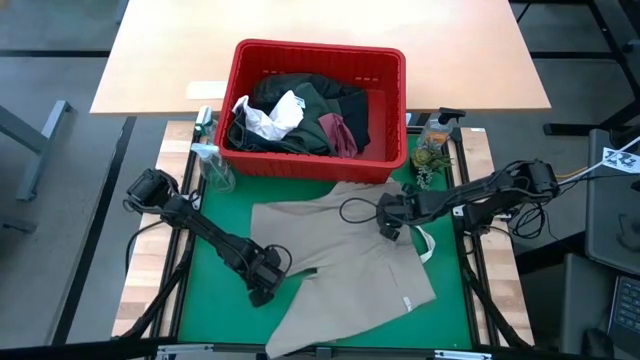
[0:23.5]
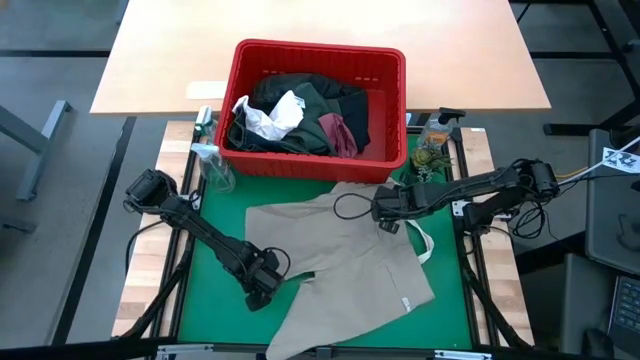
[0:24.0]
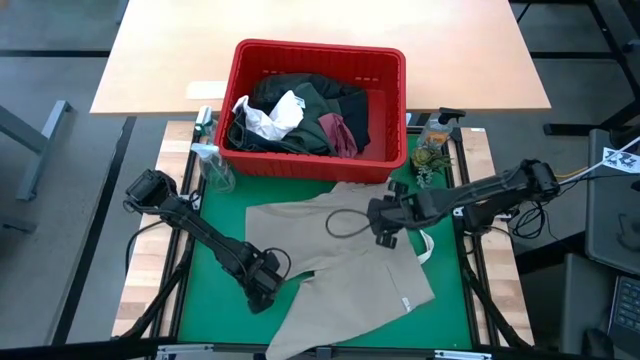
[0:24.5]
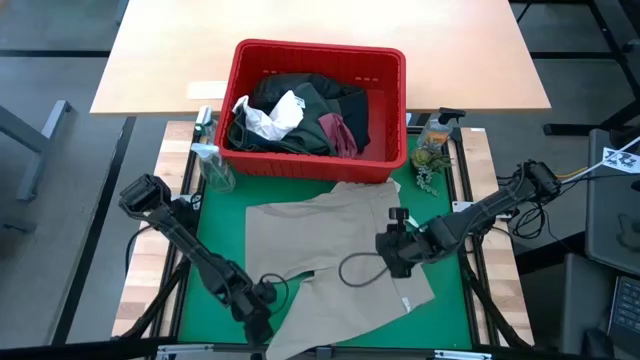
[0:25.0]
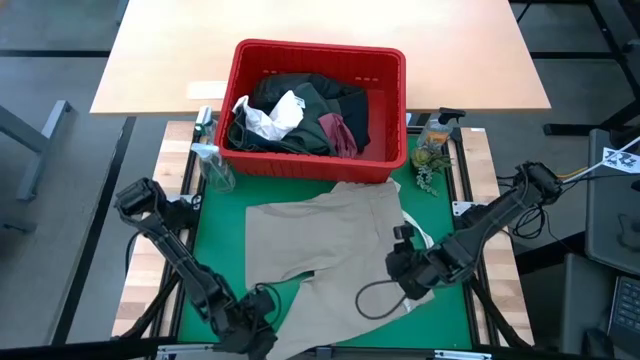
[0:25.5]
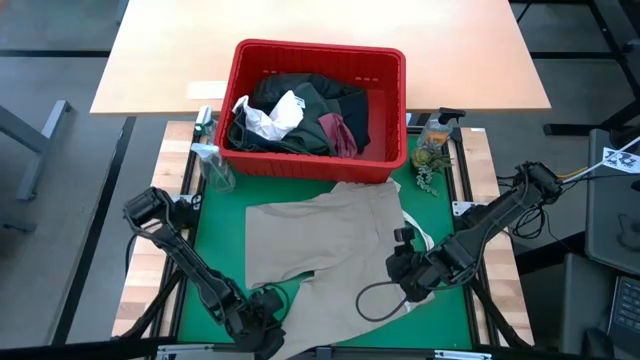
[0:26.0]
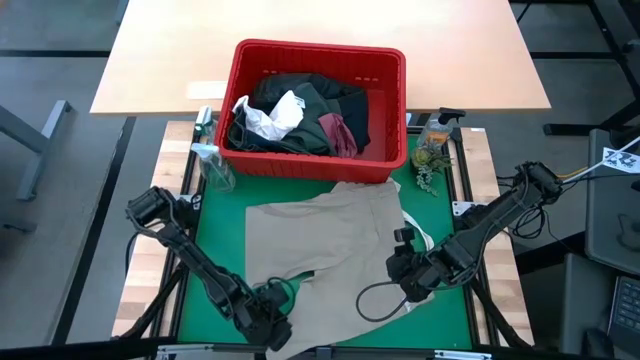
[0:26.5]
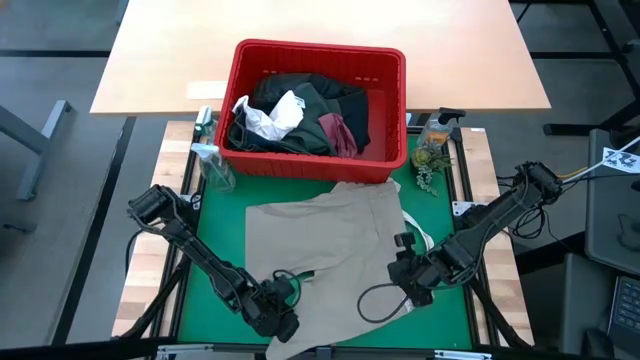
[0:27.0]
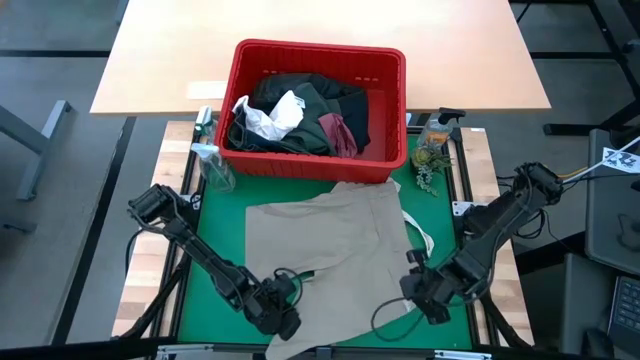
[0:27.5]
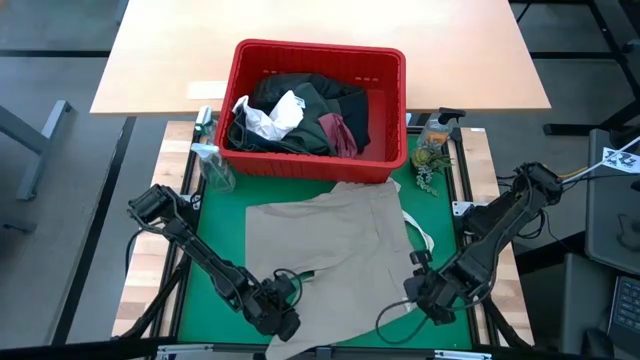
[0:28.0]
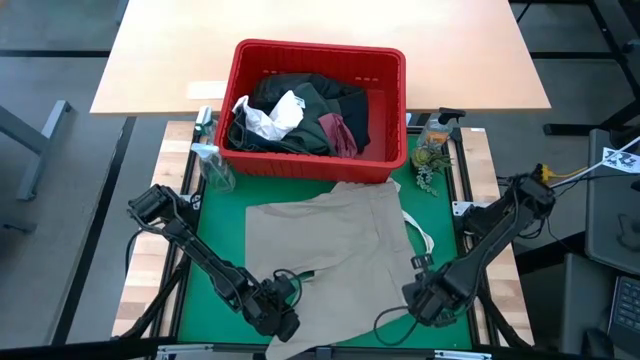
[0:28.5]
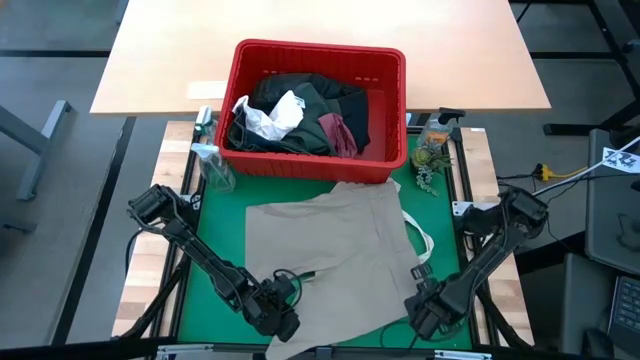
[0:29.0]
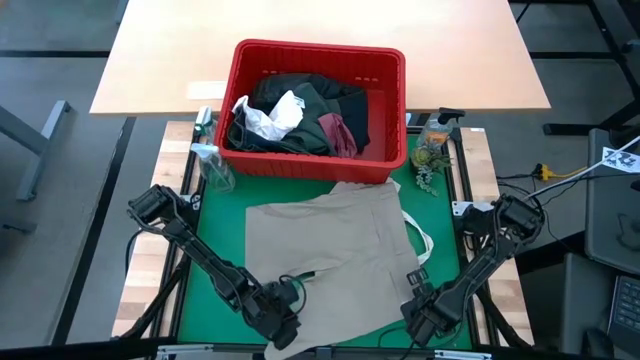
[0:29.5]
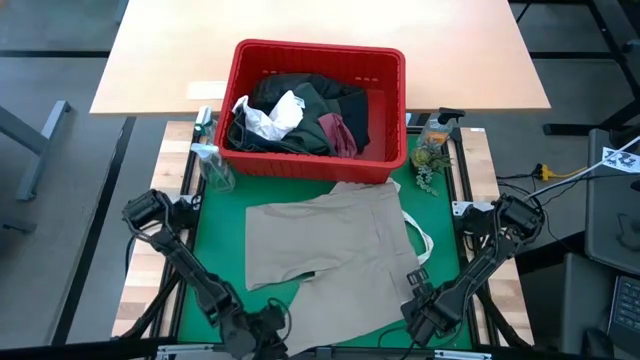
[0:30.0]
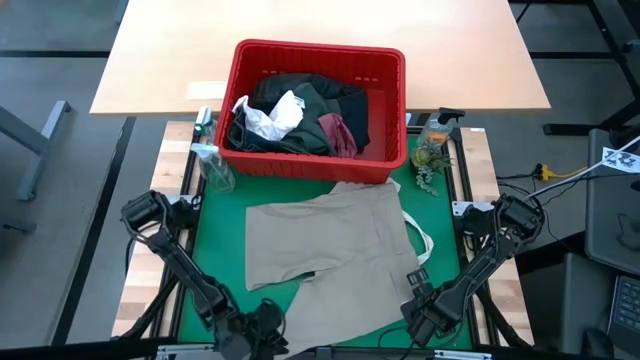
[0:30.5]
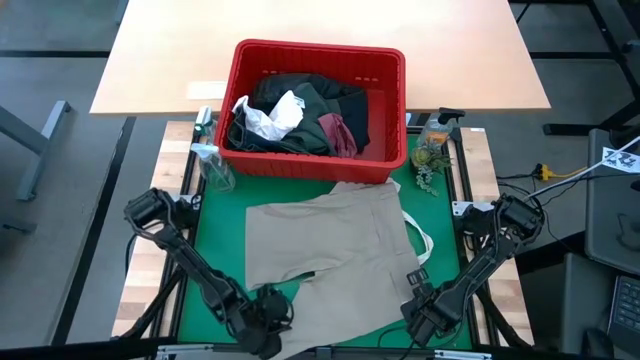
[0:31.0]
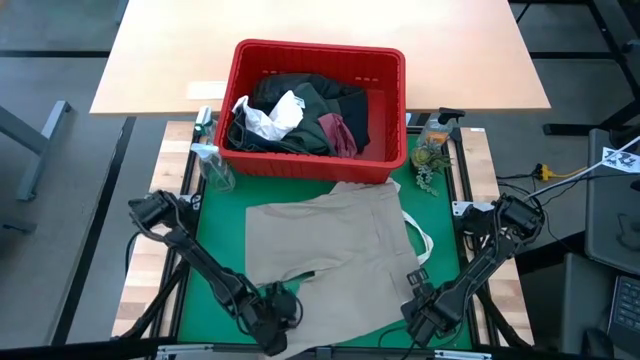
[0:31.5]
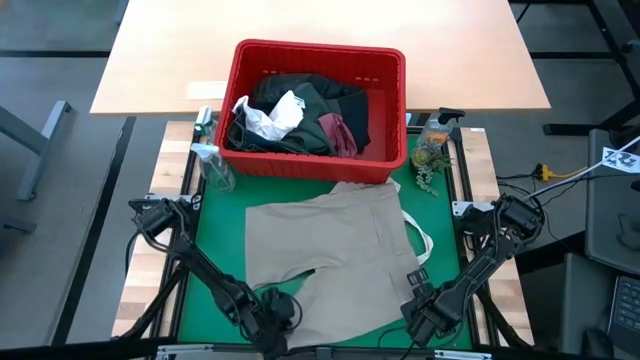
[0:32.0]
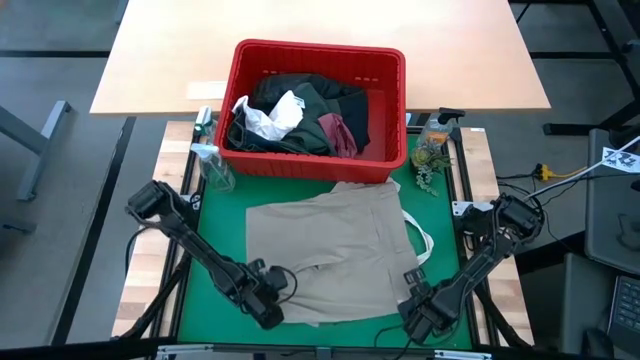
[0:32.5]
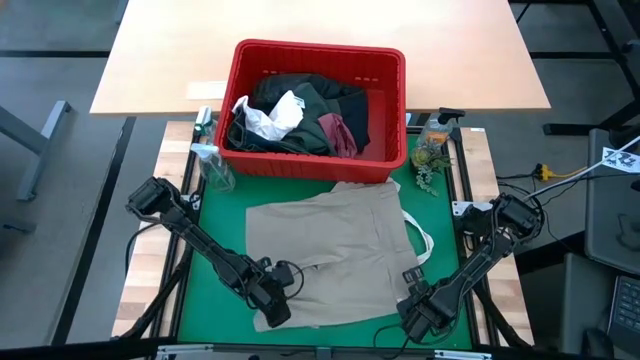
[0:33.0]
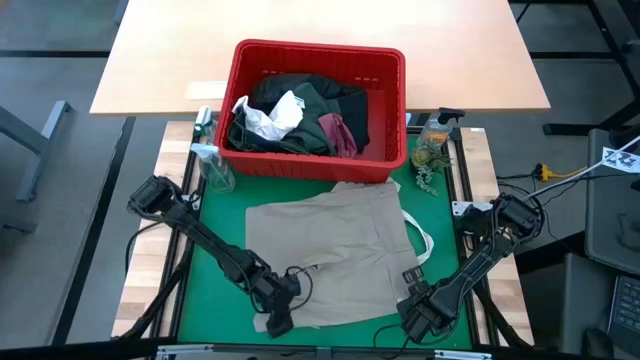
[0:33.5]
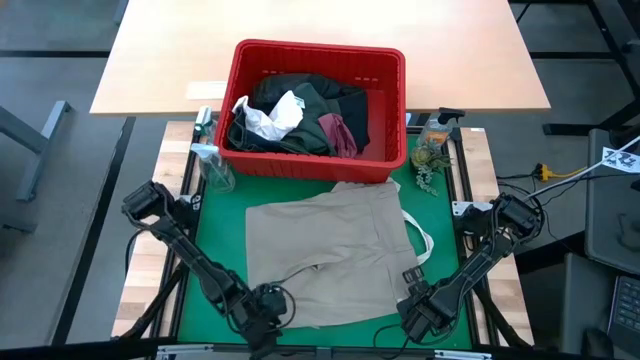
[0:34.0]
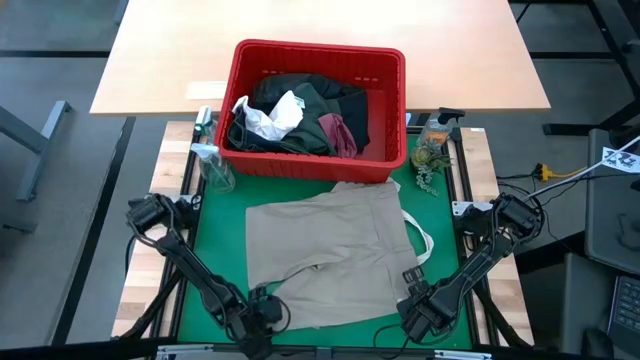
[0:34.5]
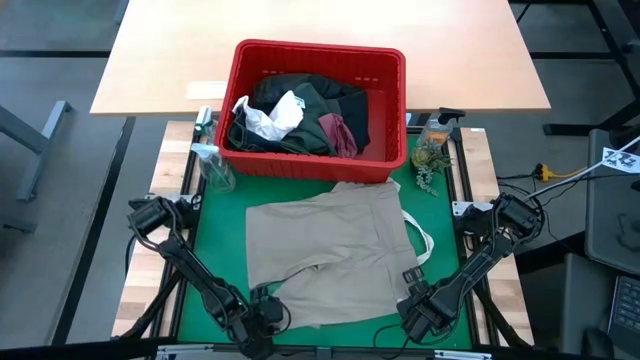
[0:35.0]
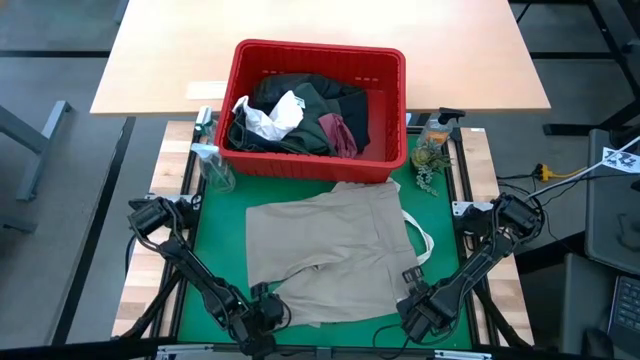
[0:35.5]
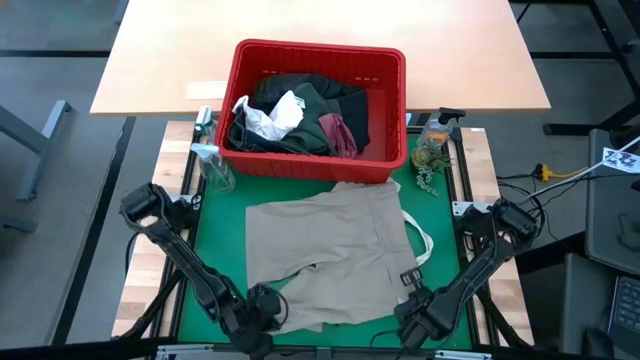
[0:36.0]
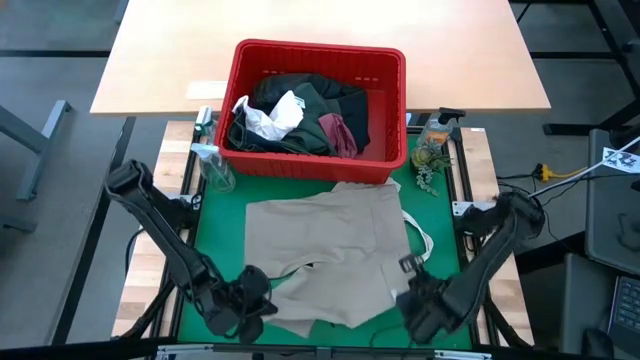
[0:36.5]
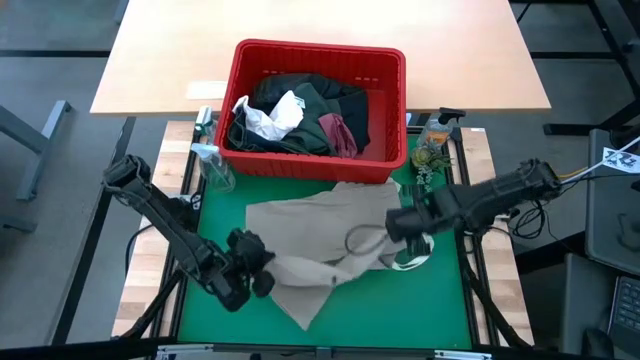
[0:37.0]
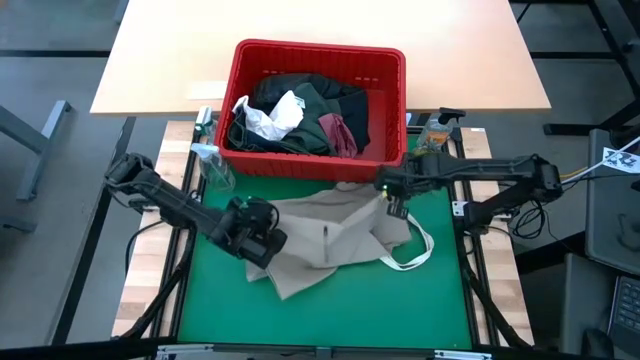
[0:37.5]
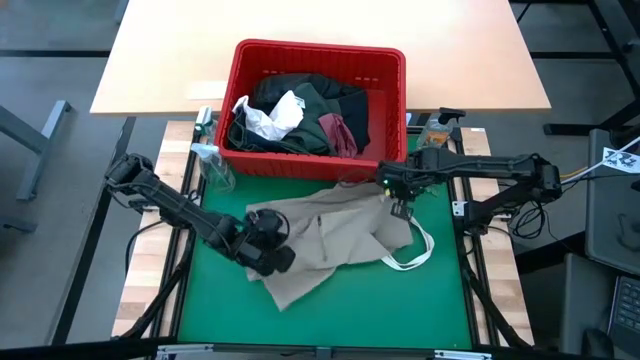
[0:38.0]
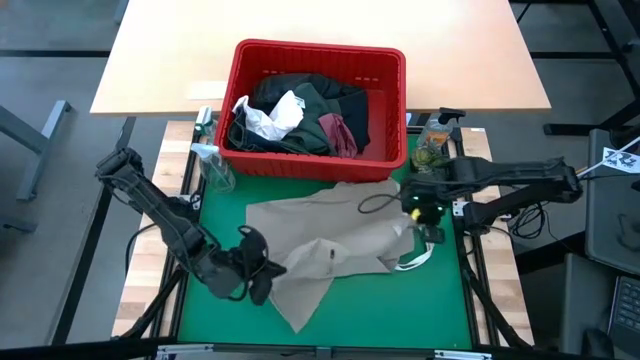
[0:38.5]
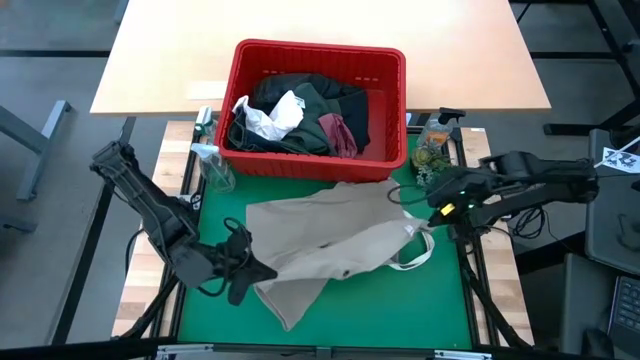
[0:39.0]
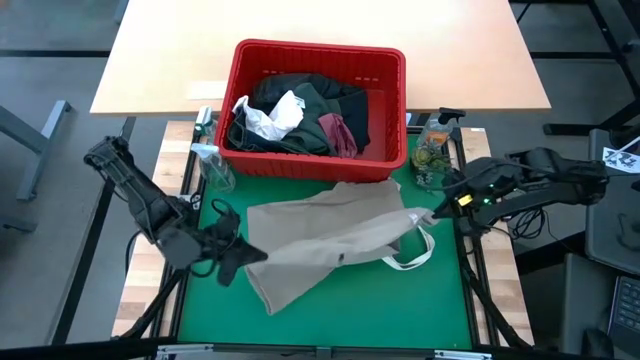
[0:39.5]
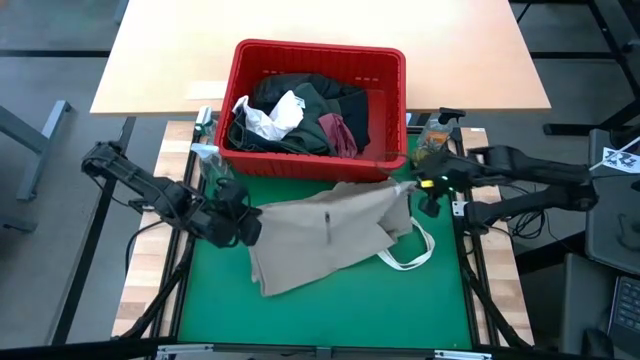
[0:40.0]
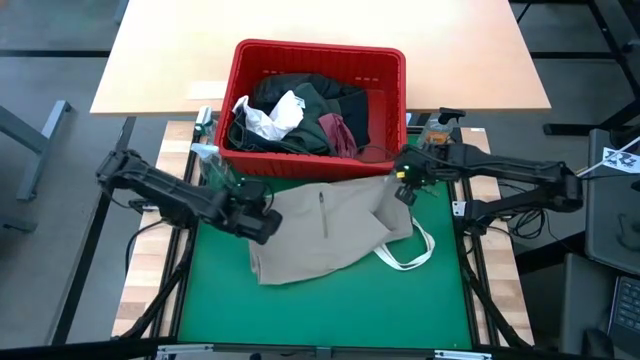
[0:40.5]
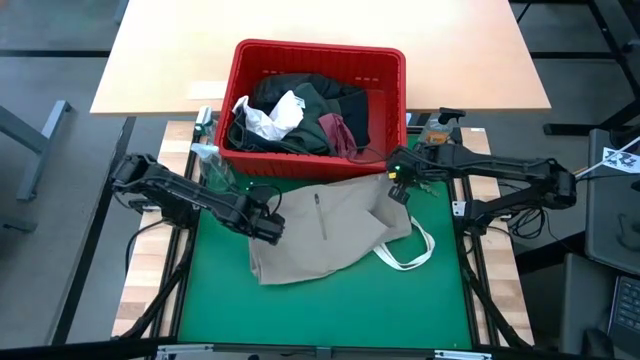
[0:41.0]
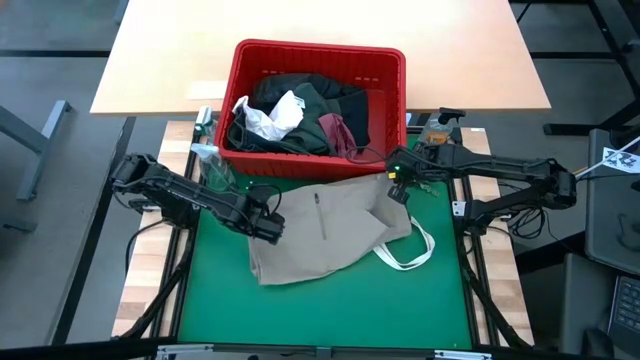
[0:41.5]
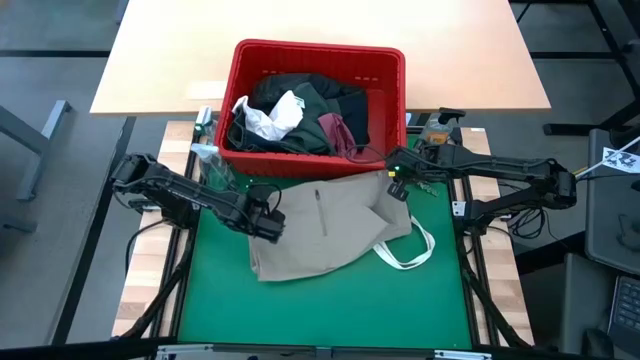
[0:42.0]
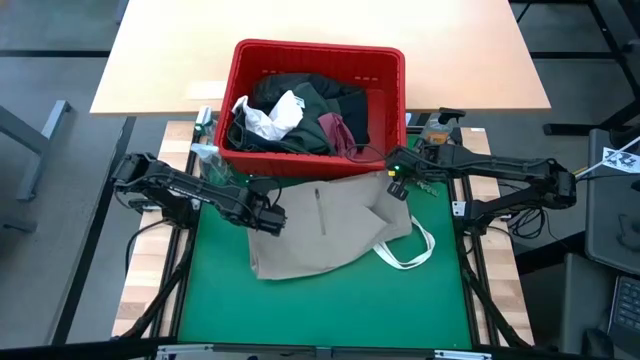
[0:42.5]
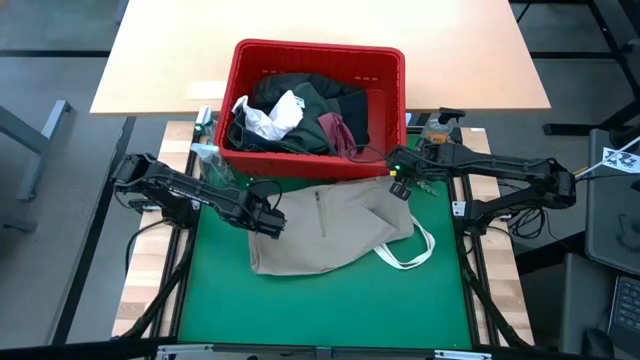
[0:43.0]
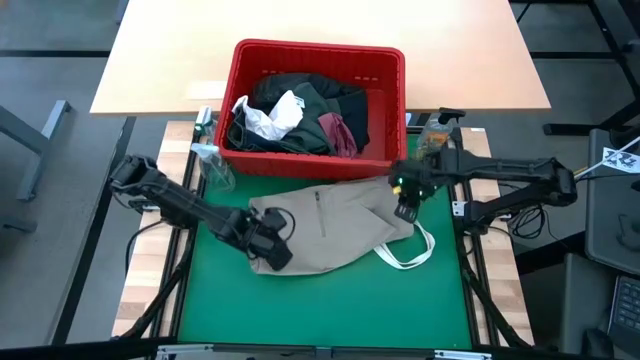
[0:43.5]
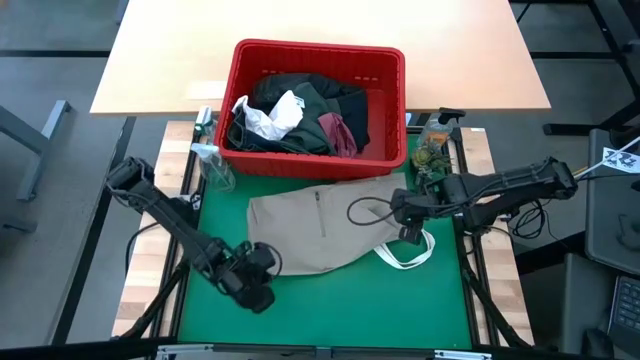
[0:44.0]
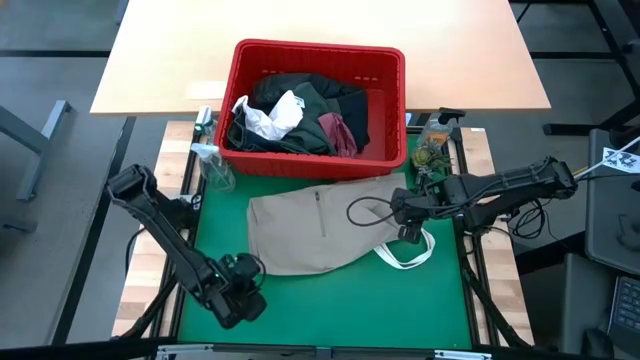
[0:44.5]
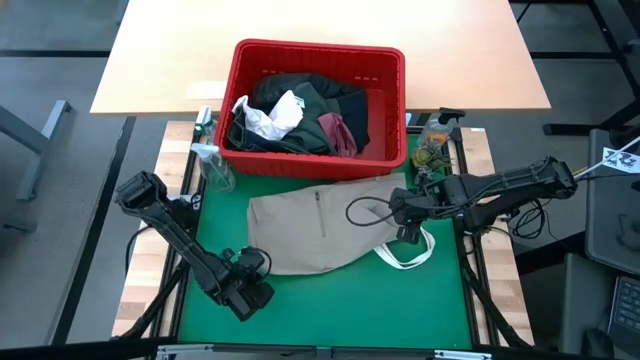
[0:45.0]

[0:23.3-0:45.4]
Task: Fold laundry
Fold the brown shorts
